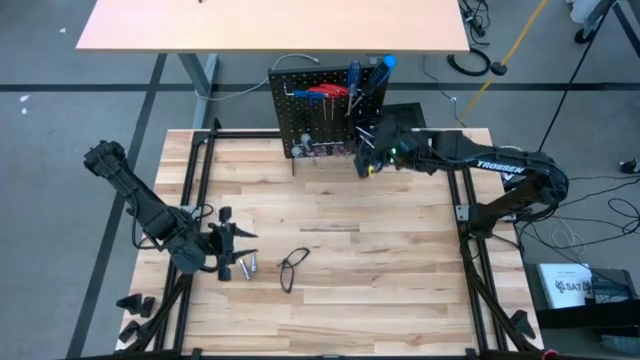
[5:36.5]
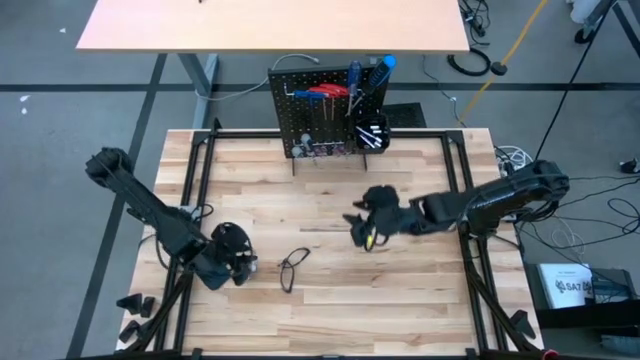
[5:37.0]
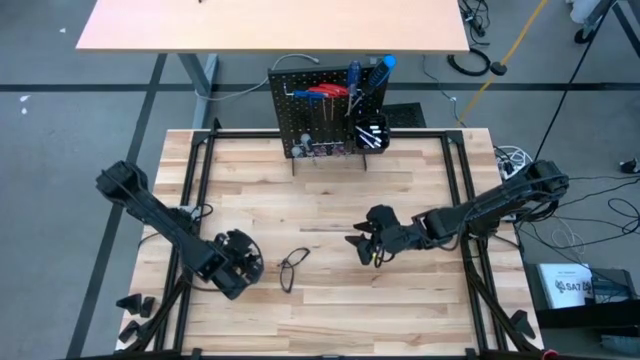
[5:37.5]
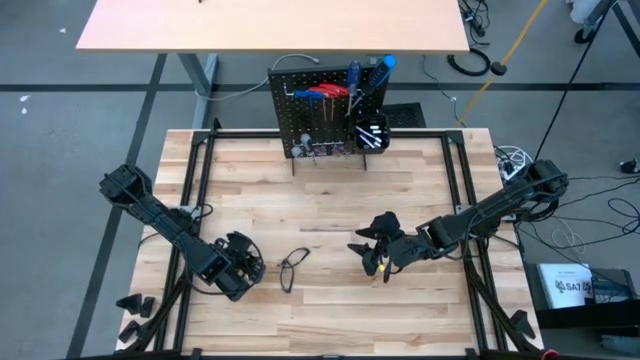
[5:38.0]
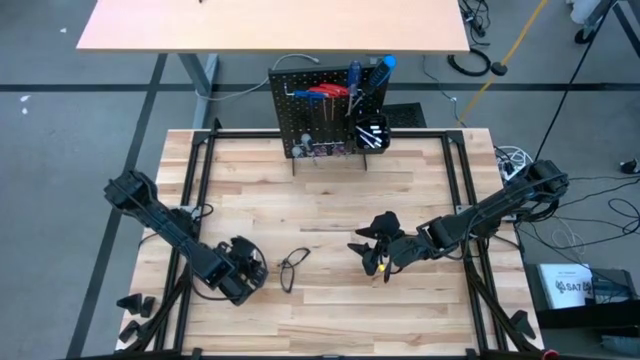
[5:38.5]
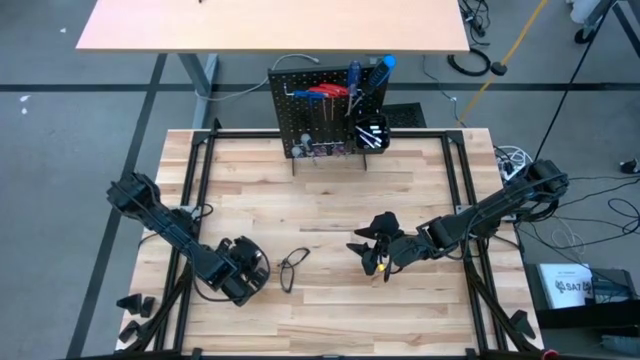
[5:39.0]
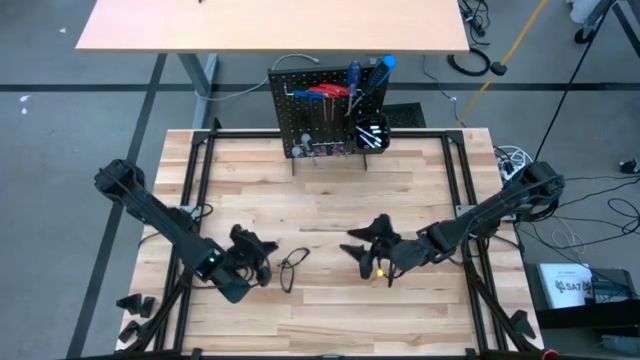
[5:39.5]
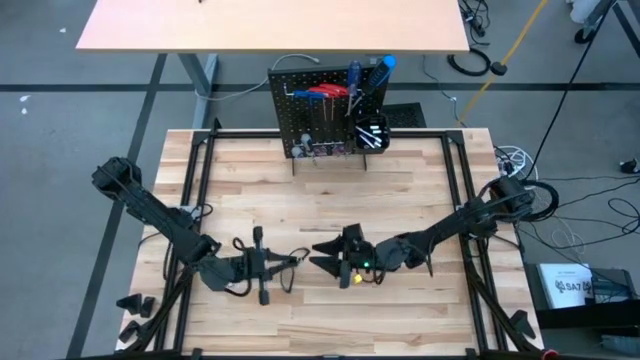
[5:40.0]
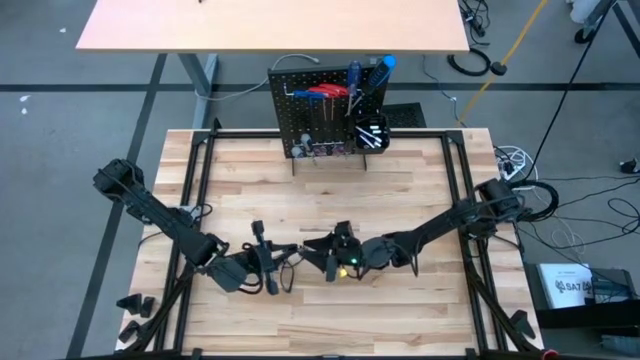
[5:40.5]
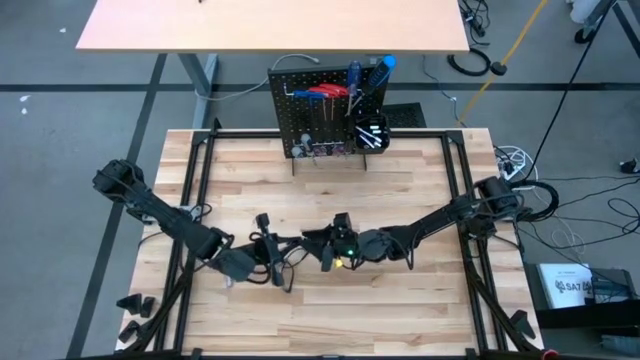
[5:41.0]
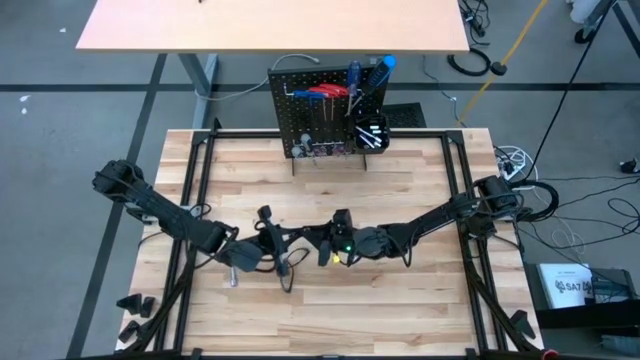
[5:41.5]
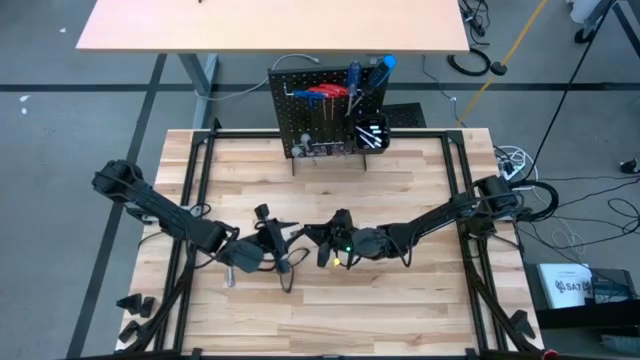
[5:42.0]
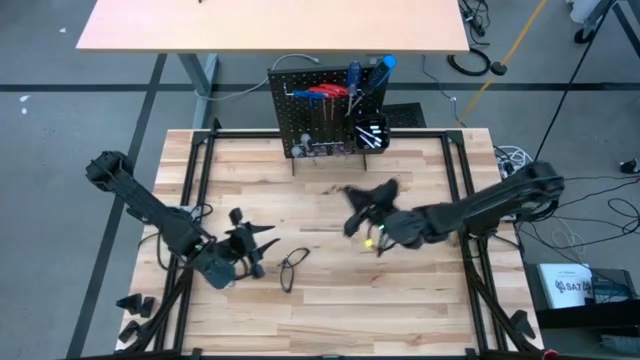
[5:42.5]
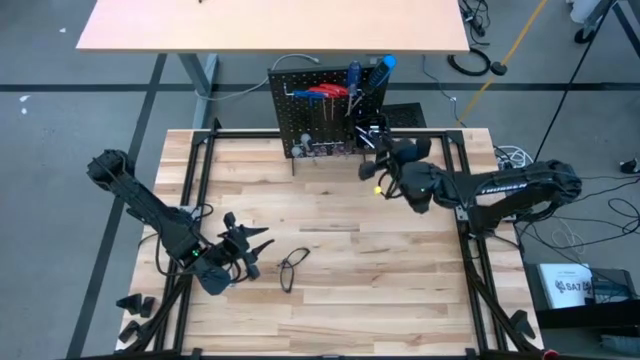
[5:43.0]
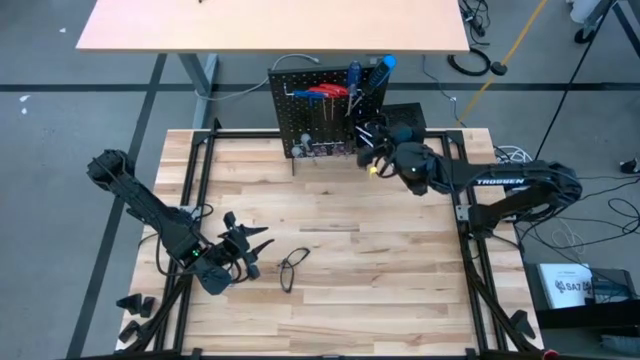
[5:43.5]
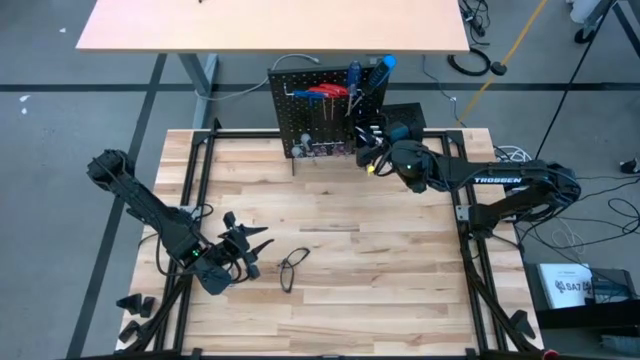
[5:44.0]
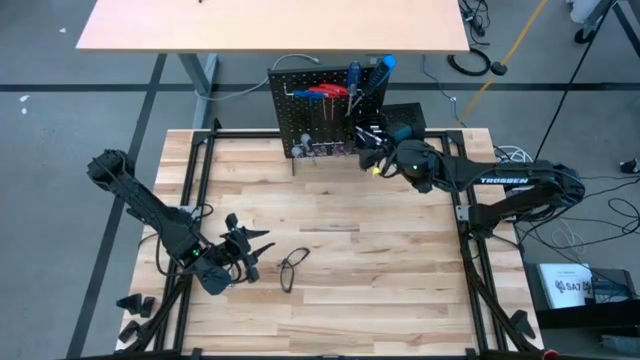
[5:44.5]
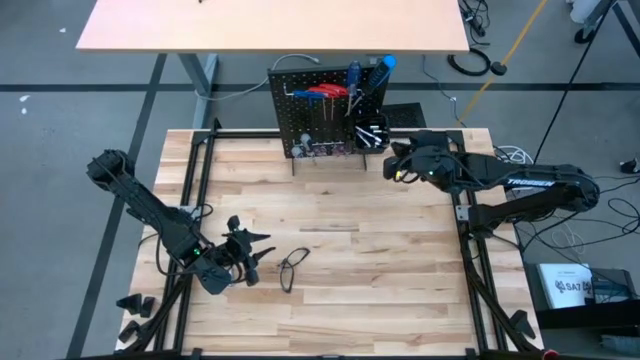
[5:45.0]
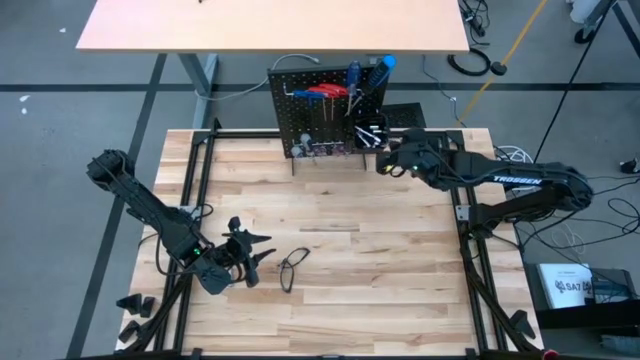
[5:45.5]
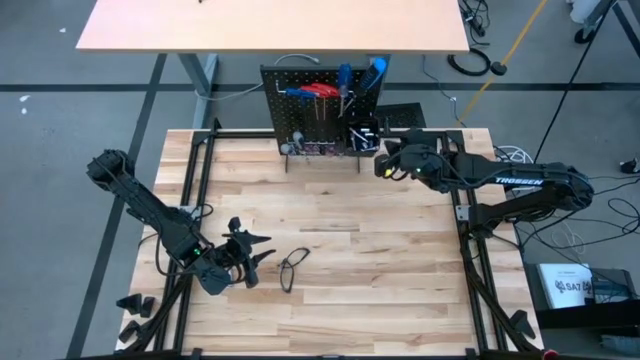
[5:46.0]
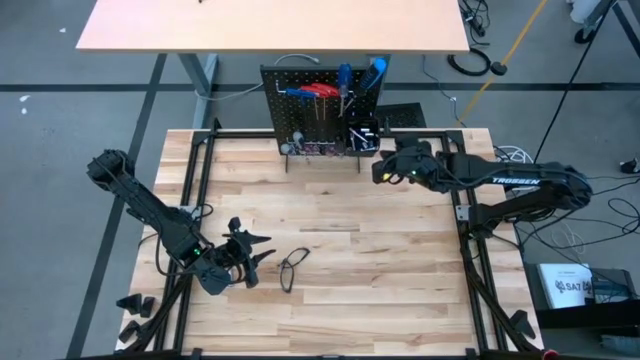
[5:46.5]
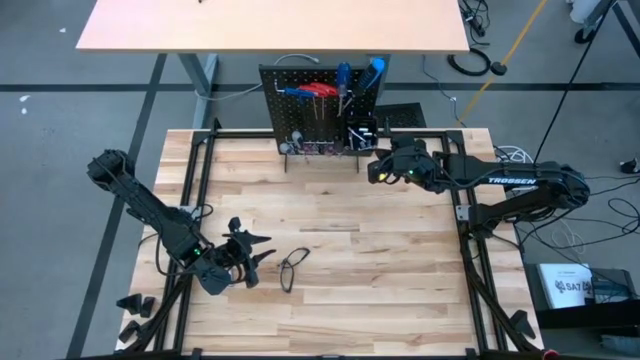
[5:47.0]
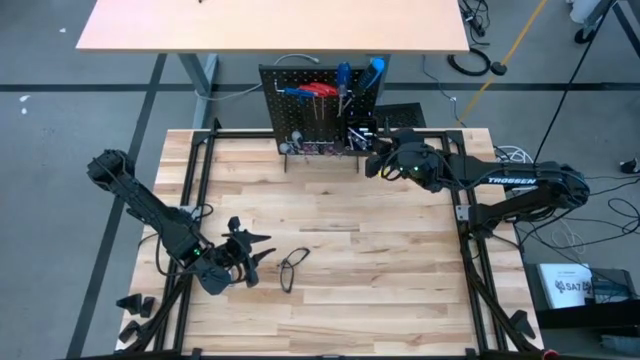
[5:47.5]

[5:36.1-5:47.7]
Task: Hang tools onto peg board
Put the right extension bar into the black bin on the peg board

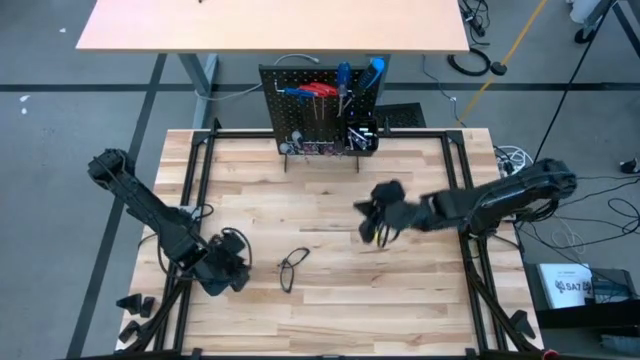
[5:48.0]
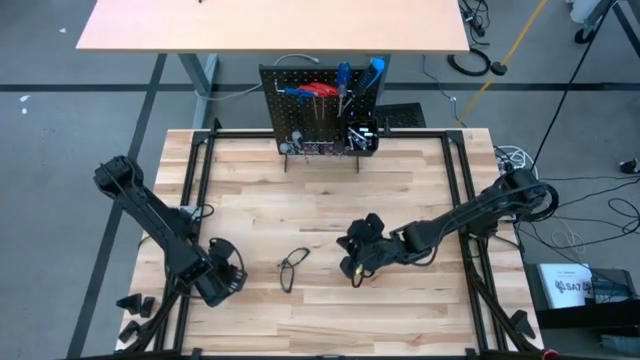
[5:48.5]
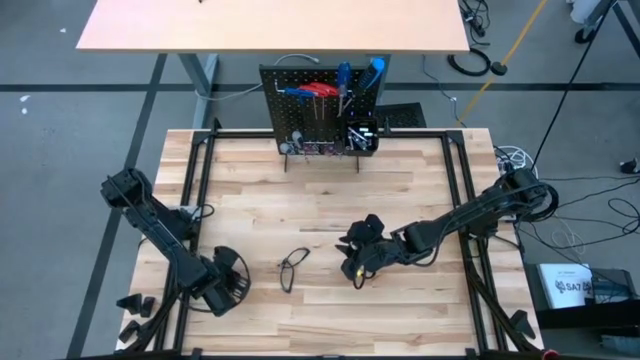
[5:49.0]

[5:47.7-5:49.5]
Put the extension bar into the black bin on the peg board

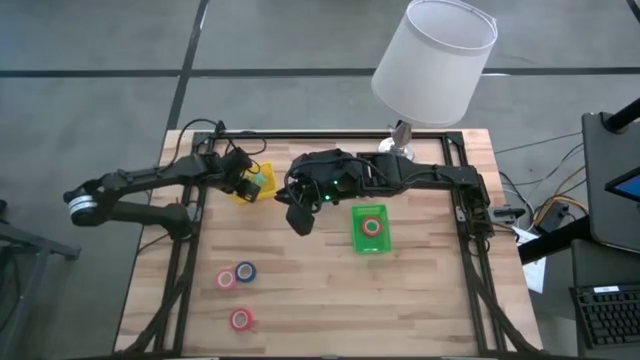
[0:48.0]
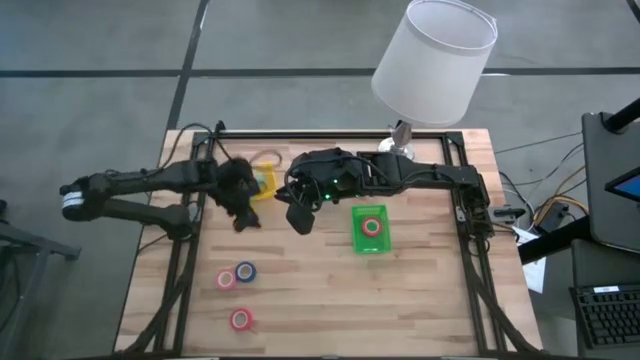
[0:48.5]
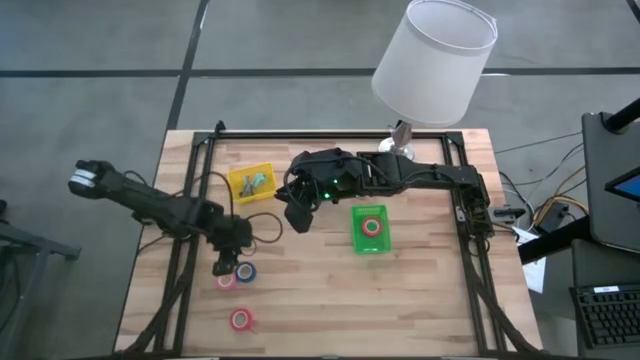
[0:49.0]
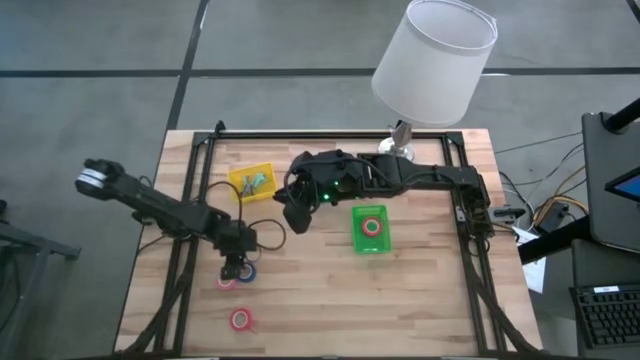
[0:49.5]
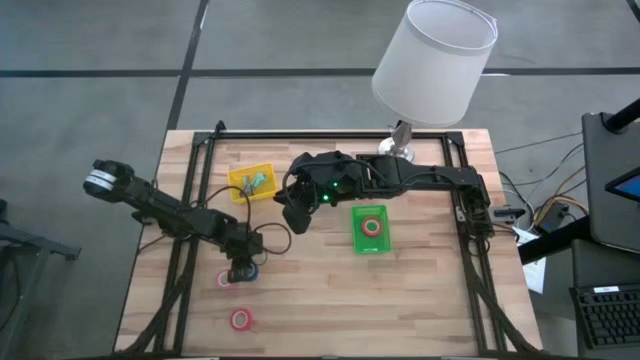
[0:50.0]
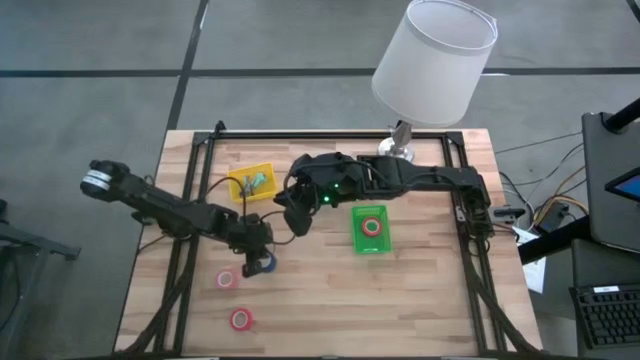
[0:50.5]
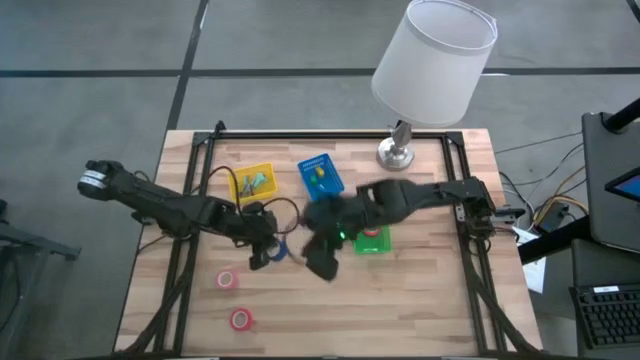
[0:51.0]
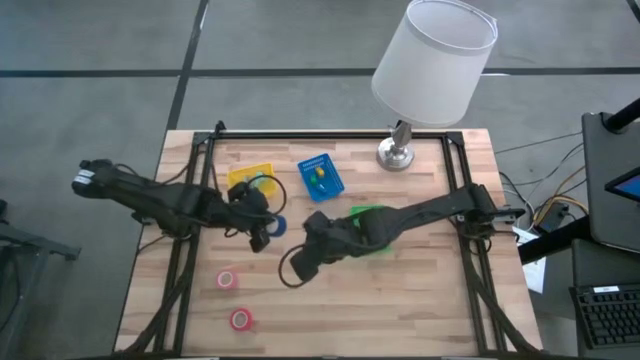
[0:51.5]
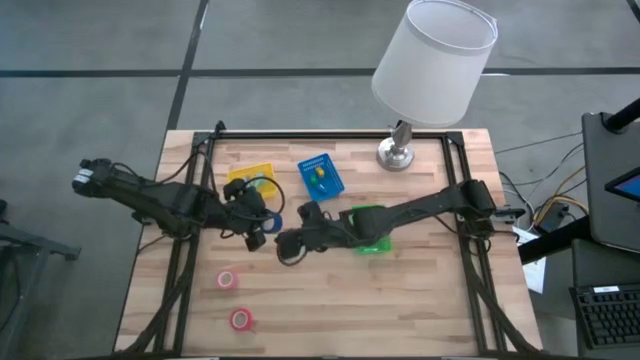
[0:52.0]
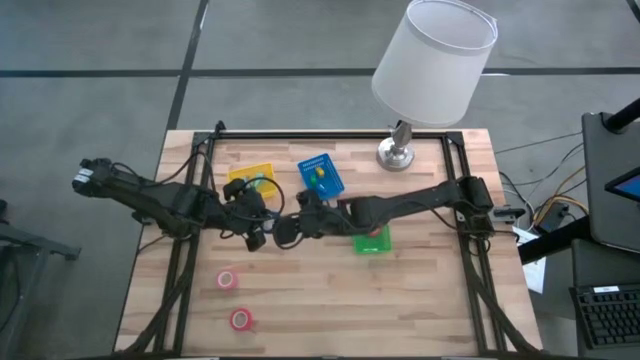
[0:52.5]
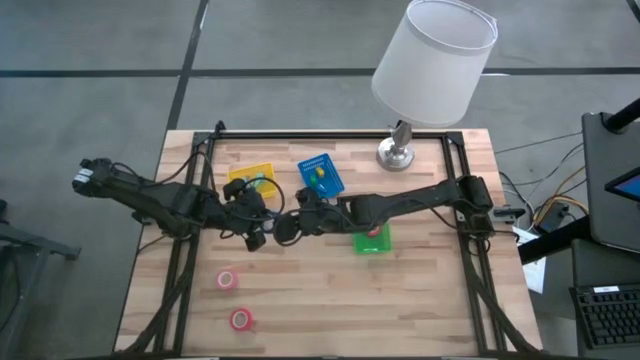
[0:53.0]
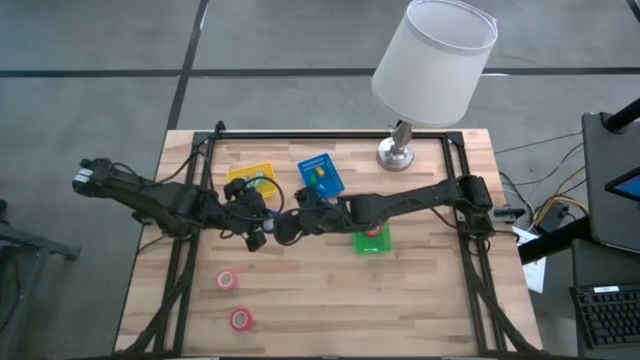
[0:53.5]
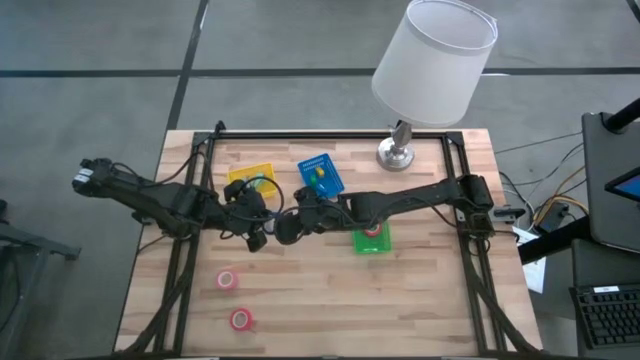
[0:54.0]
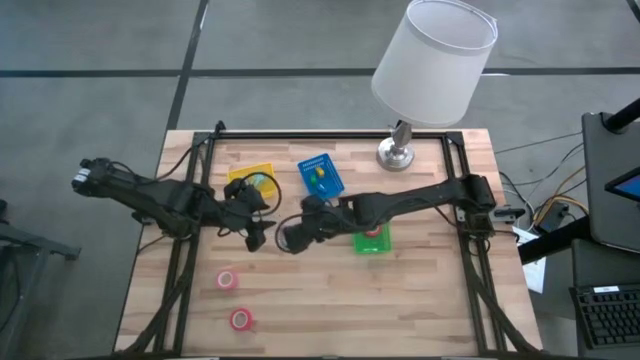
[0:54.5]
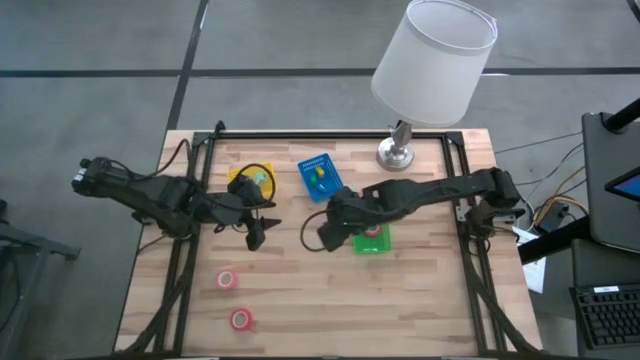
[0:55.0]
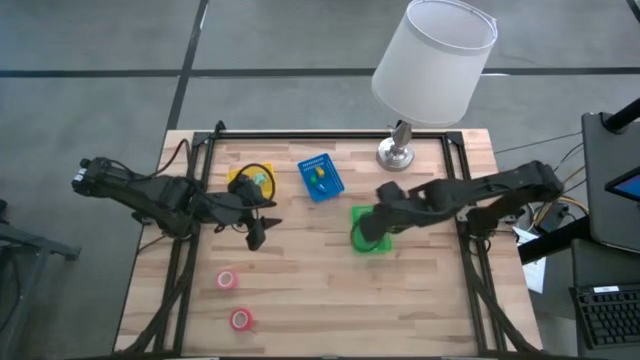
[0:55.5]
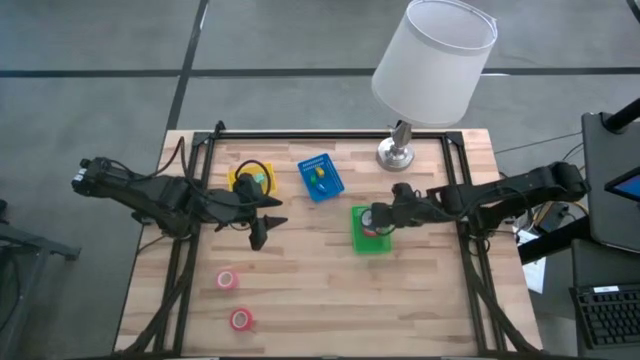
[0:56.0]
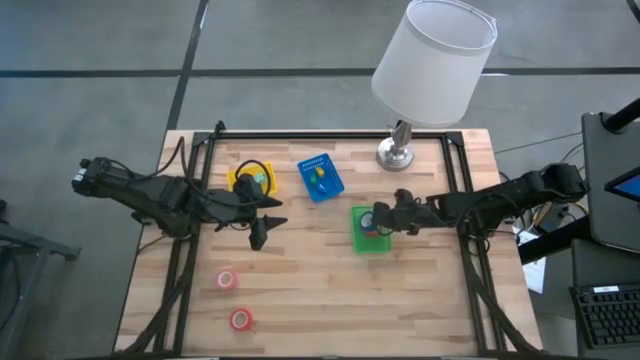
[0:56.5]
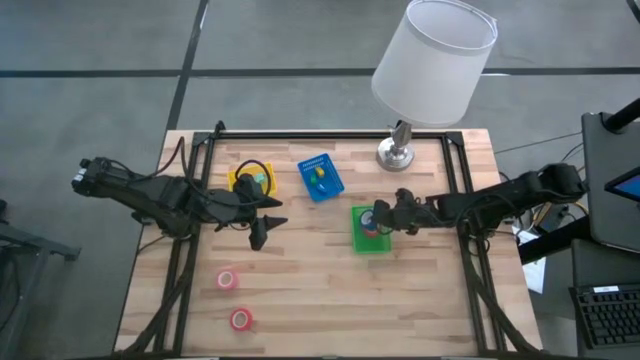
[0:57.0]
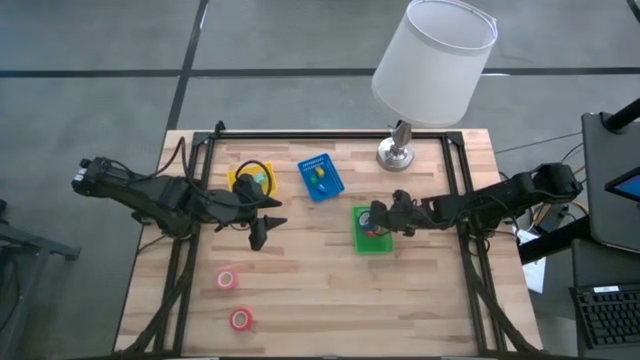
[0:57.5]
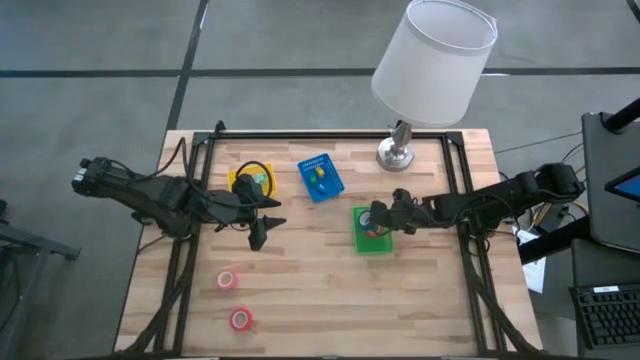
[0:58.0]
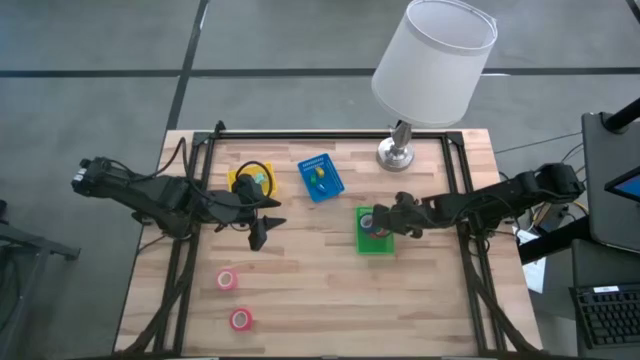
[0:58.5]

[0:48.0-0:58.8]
Task: Pick and place Stapler, Stapler remover, tape
Put the blue tape into the green bin
